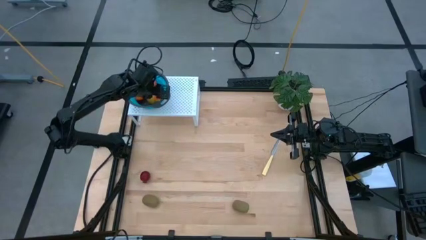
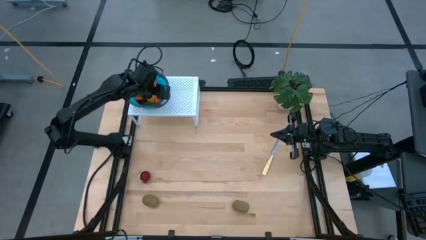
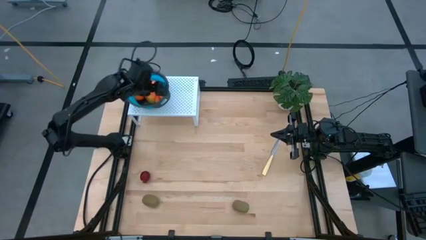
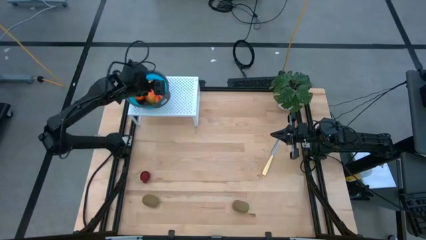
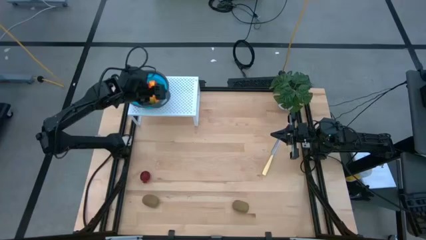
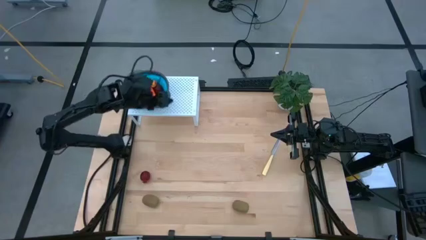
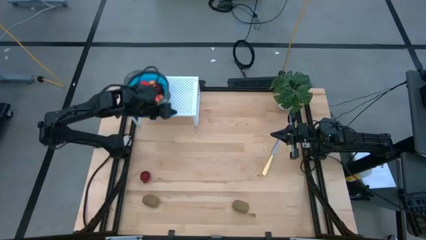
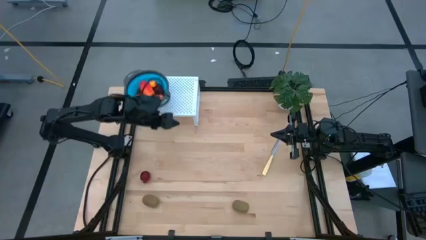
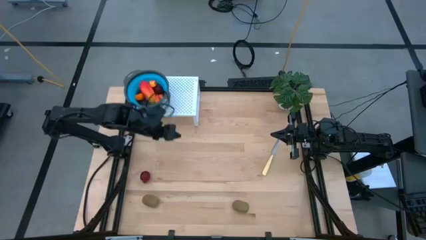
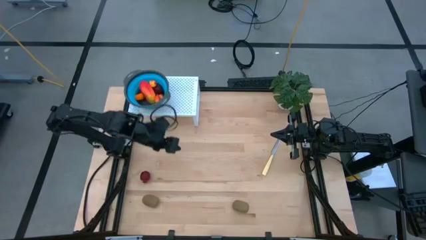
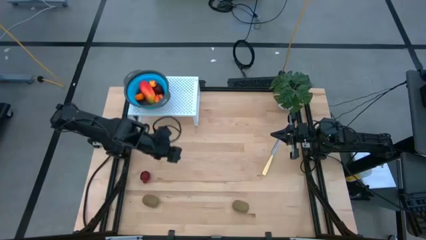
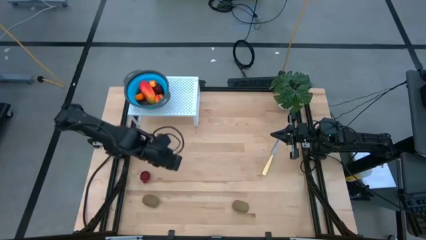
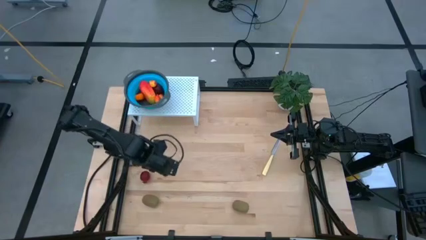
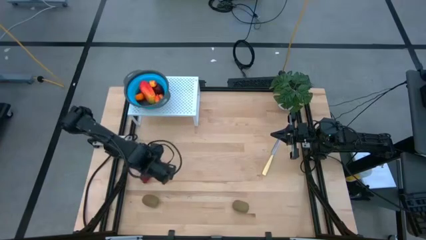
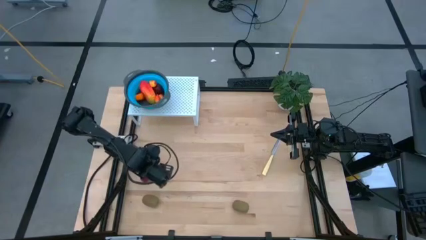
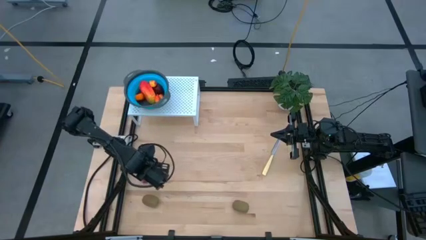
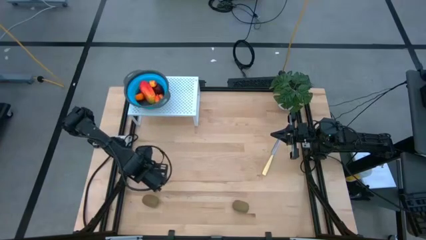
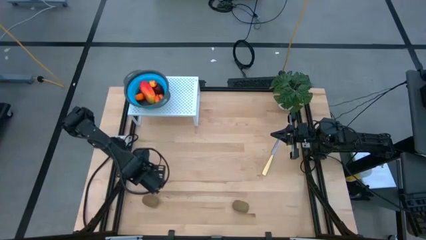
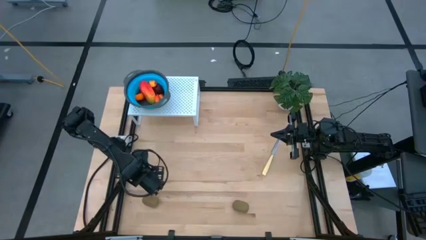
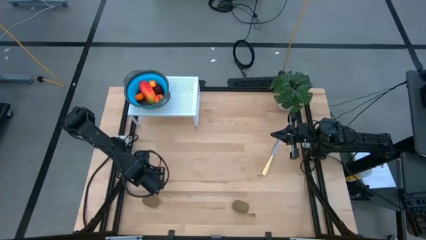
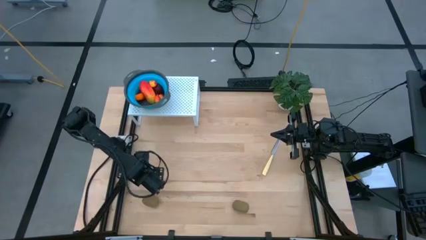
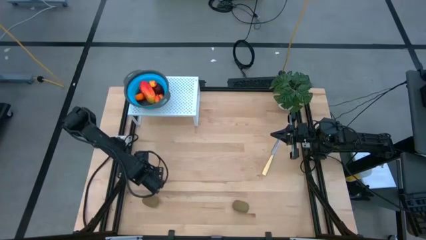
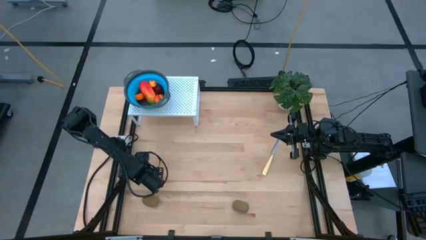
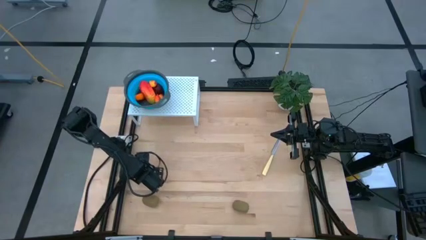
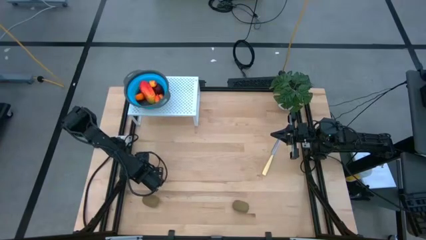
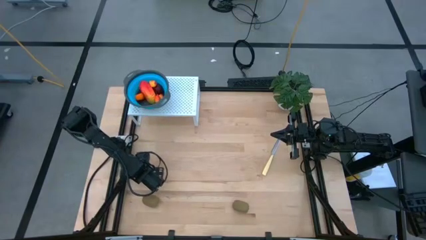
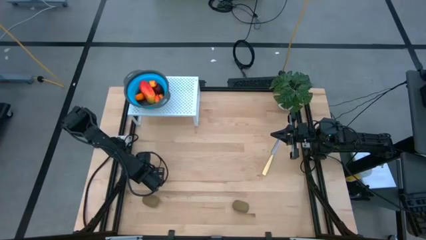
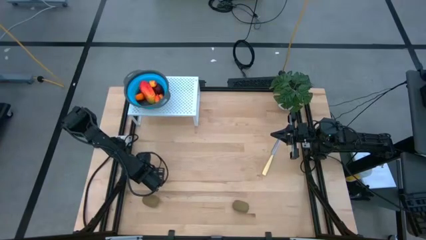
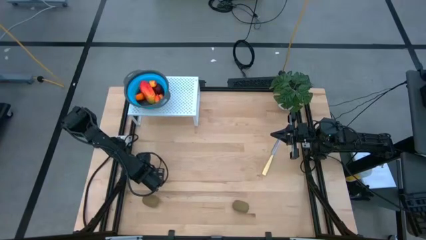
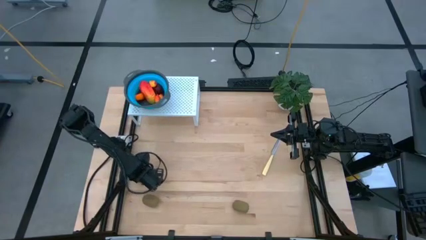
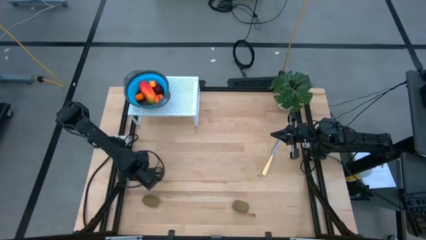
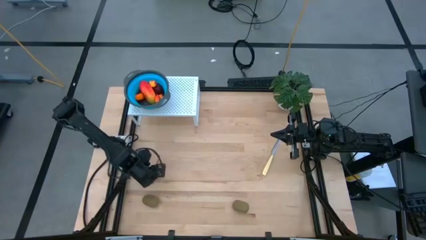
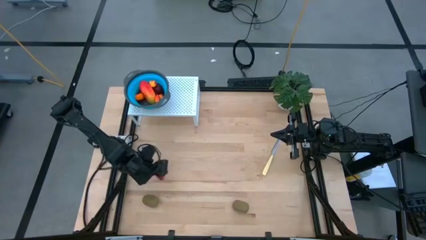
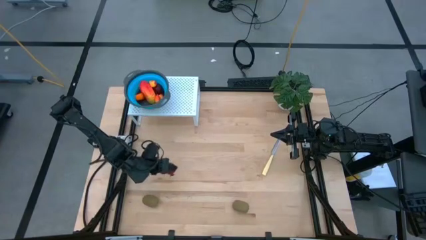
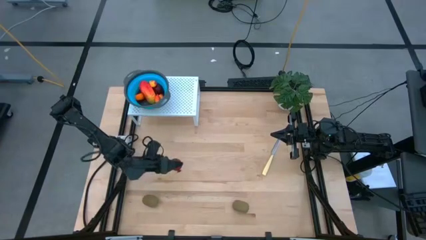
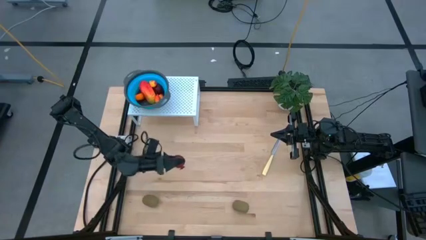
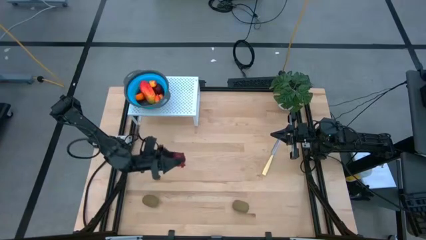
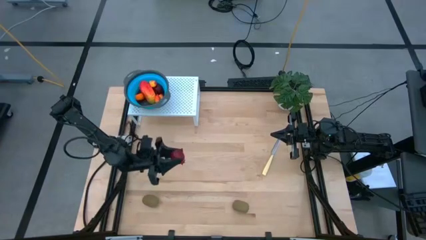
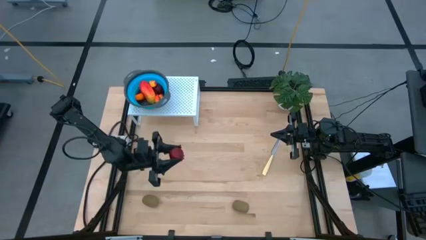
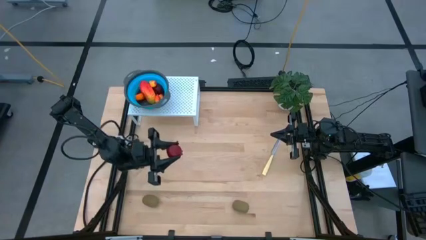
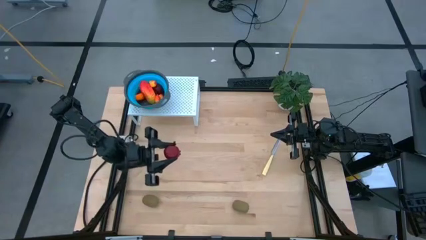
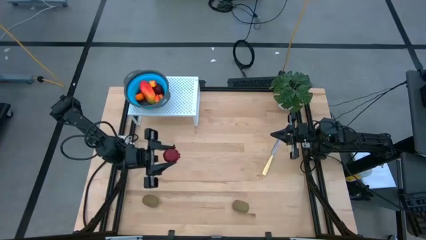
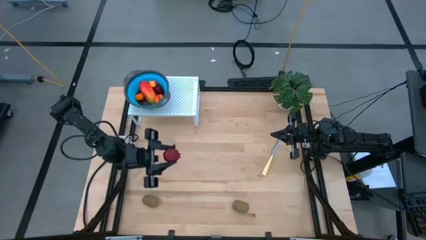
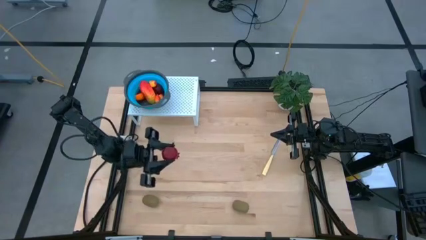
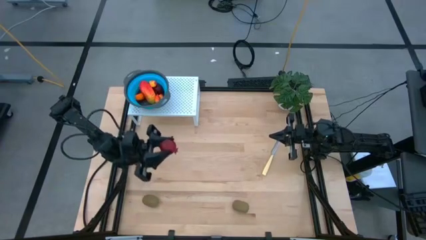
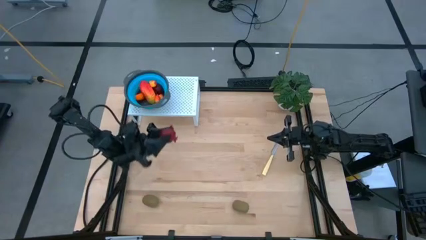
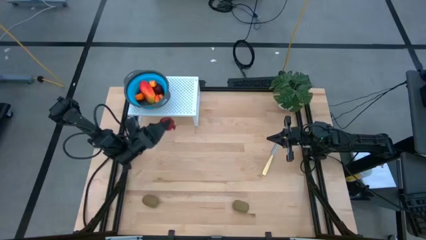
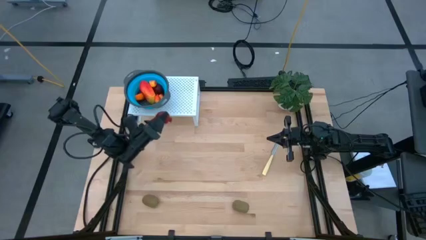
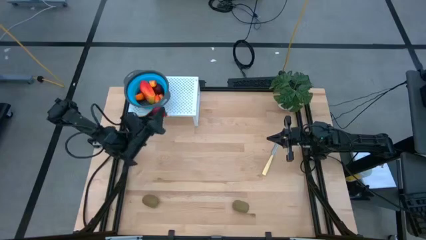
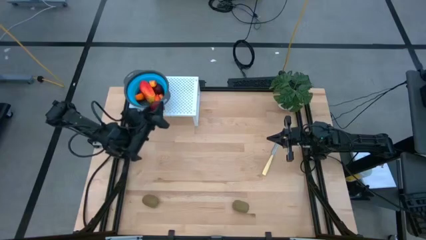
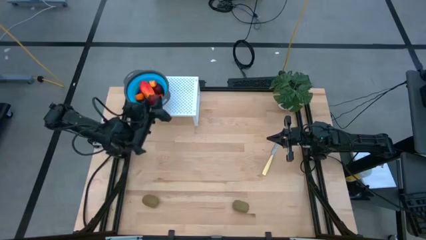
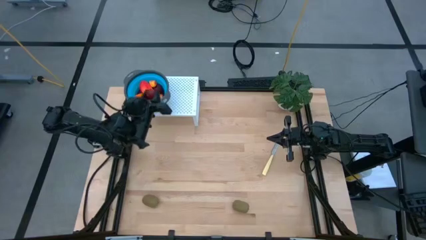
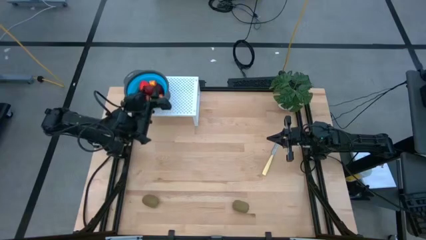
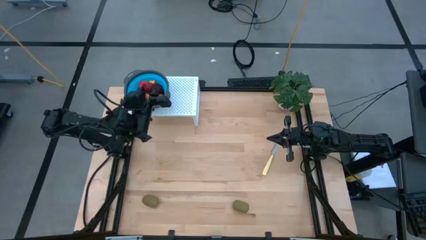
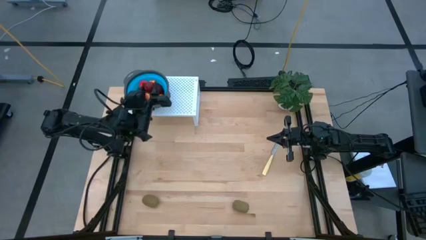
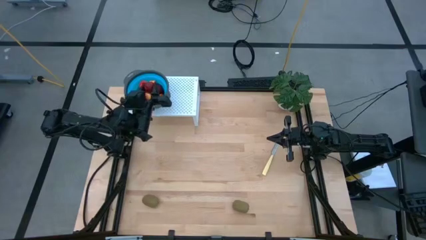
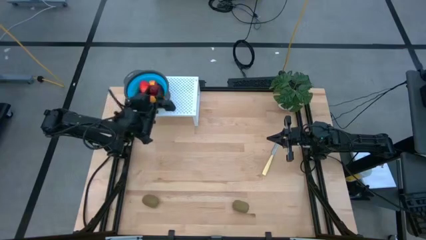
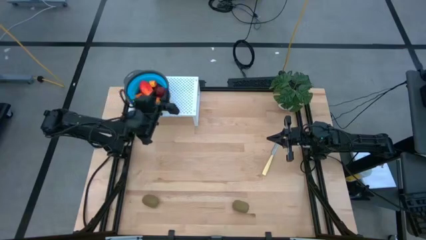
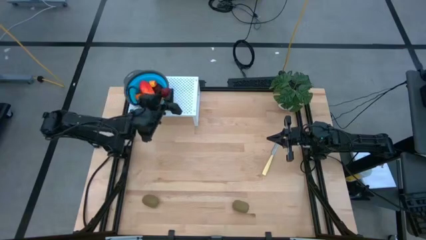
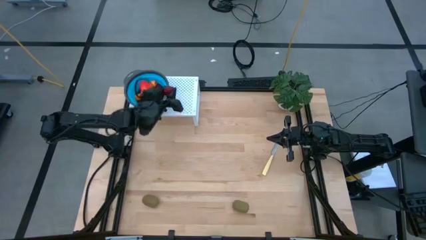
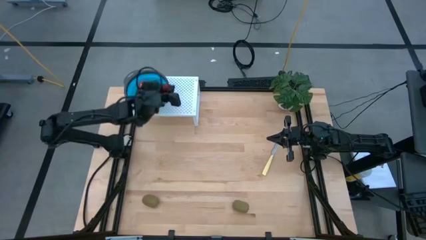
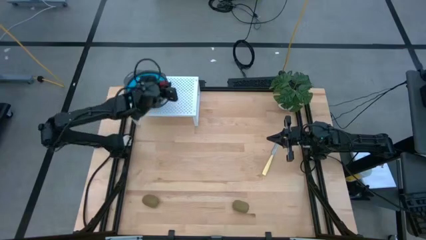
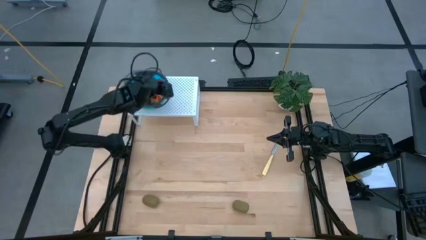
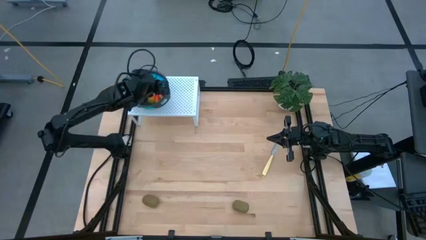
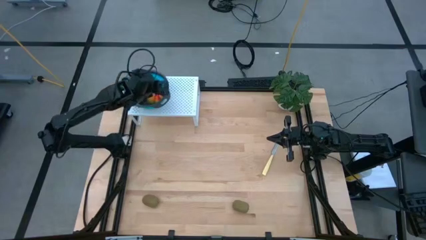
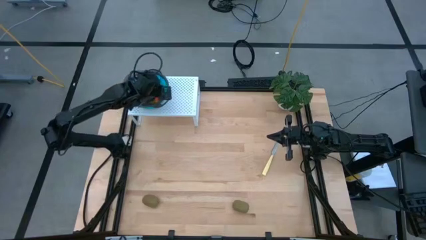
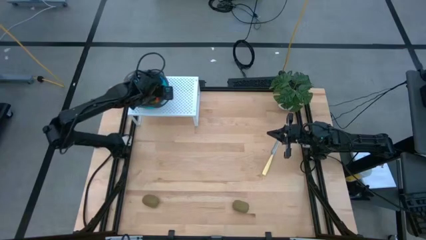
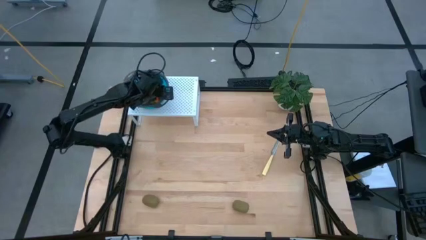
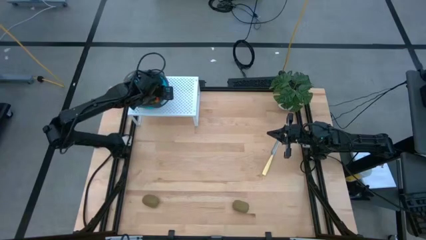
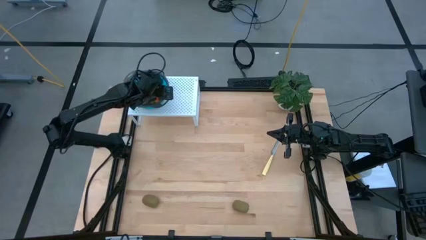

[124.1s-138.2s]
Task: Pick & Place Fruit
Put the pomegranate into the blue strainer bowl on the shelf

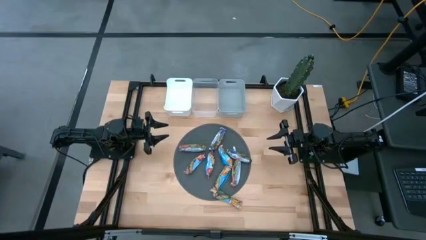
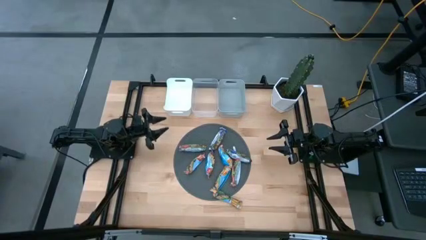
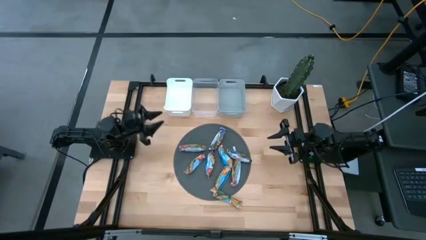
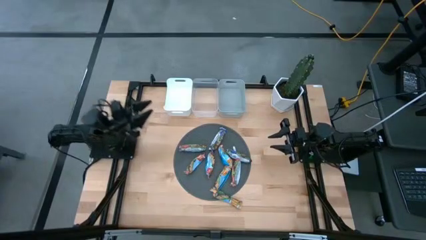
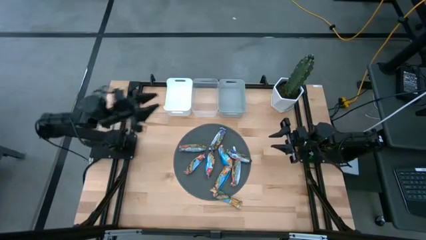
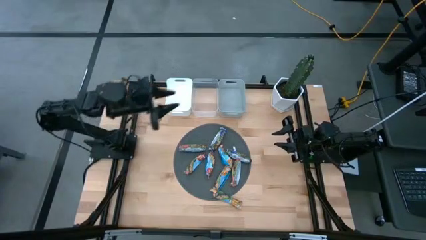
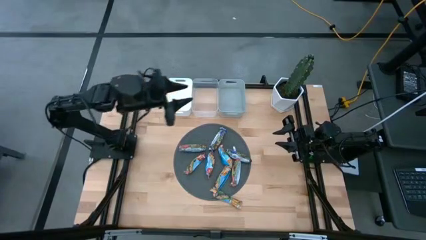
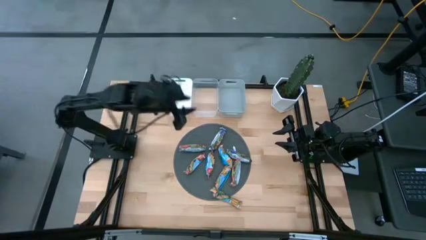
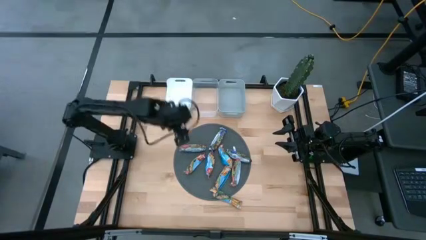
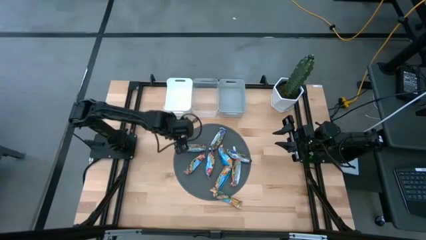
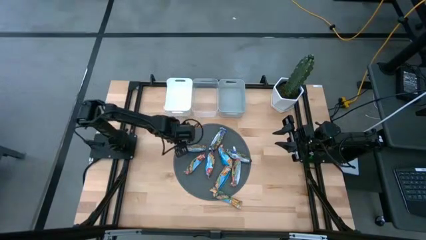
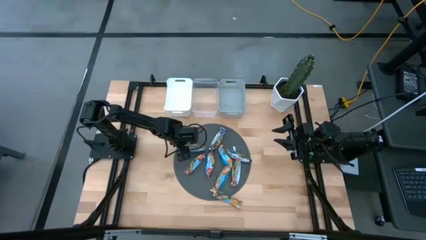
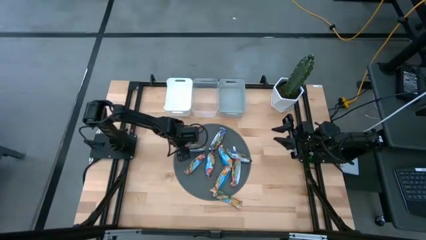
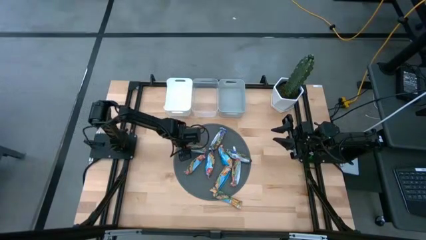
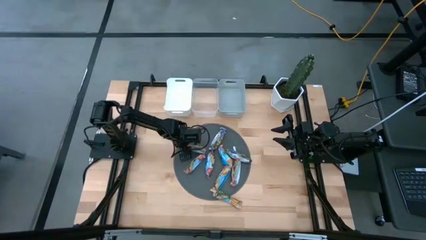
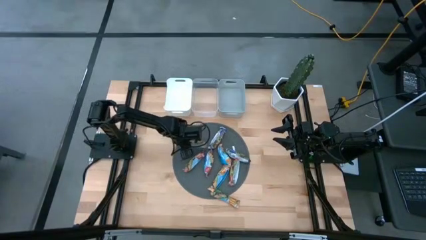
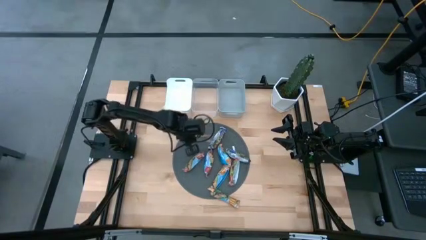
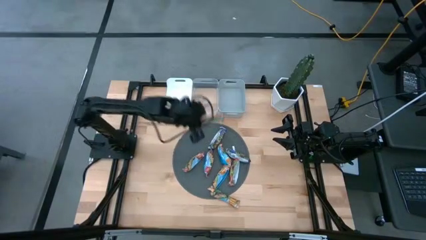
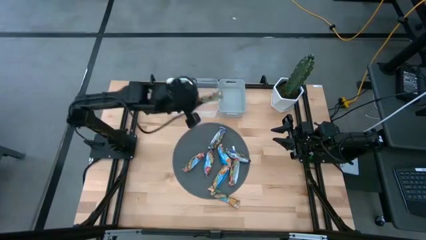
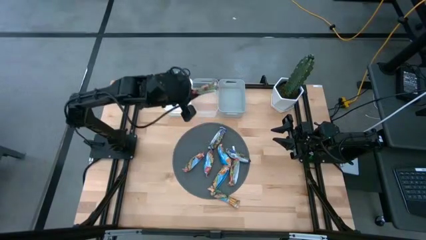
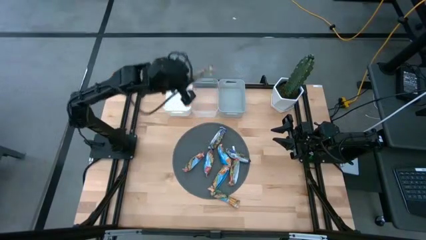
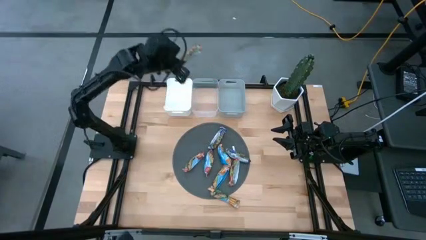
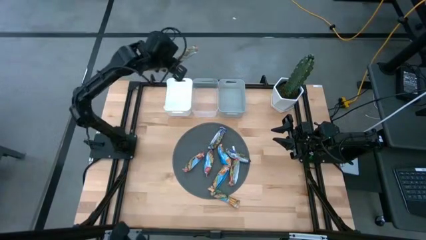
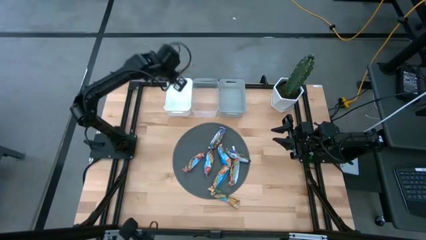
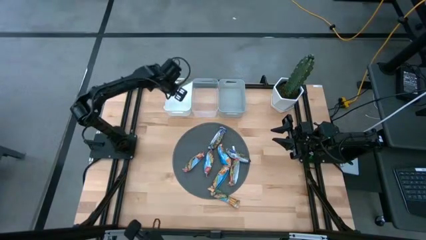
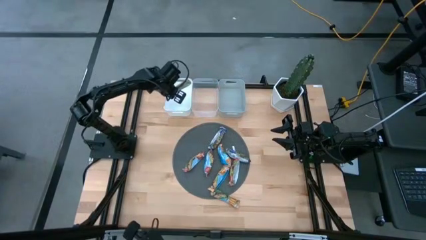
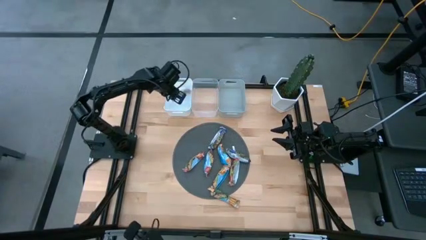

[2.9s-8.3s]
Task: Pick and place Granola Bars by type
Put the red granola bar into the white bin
